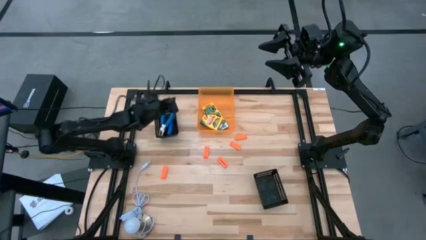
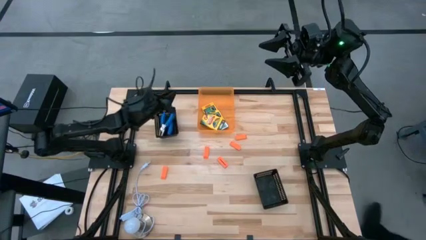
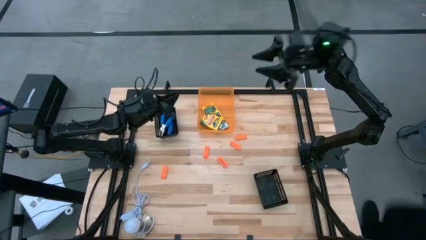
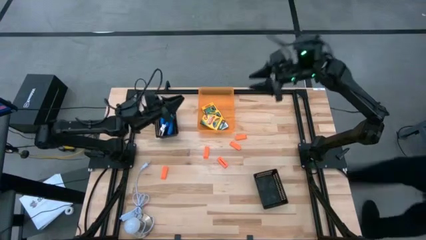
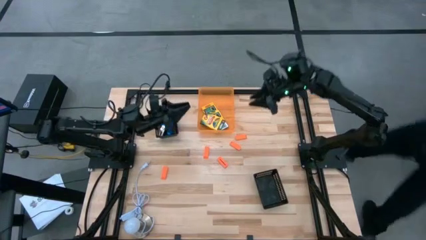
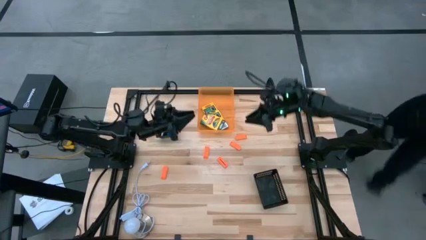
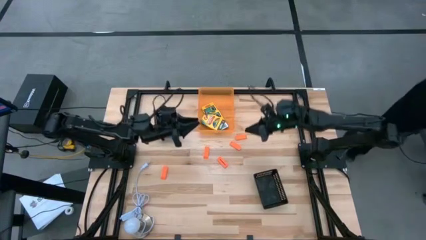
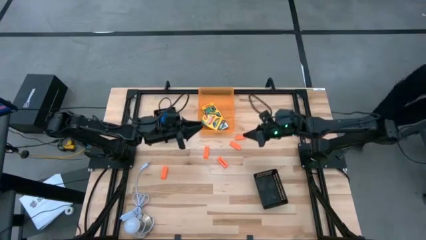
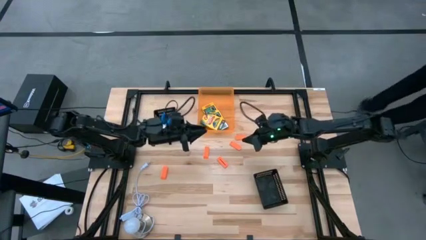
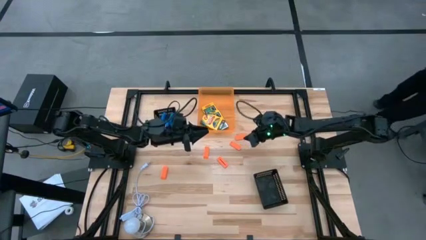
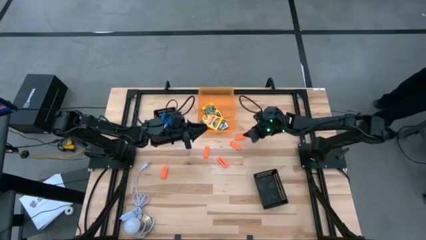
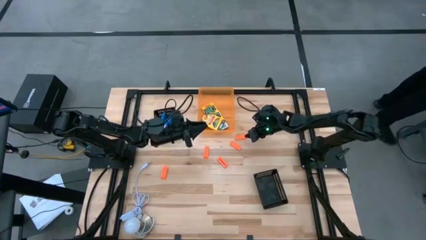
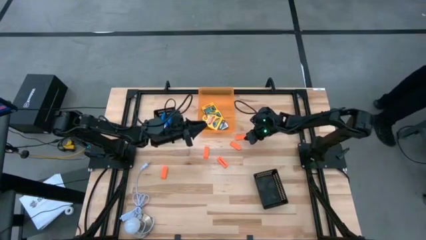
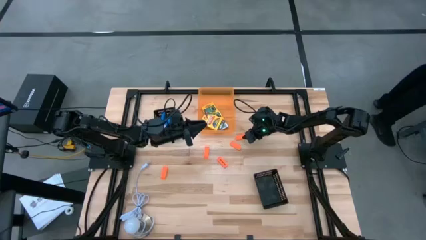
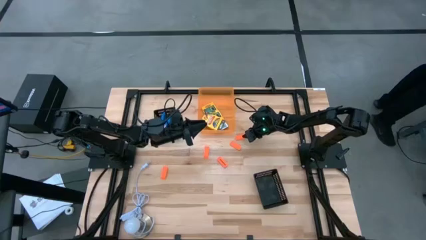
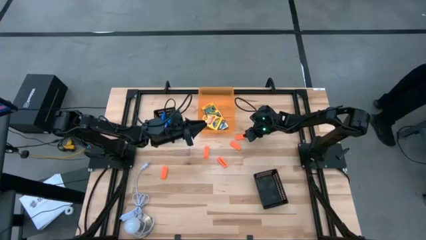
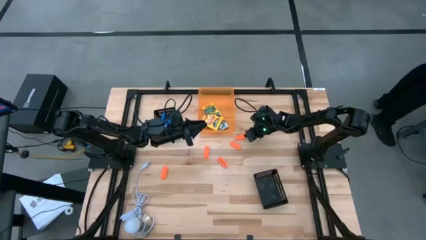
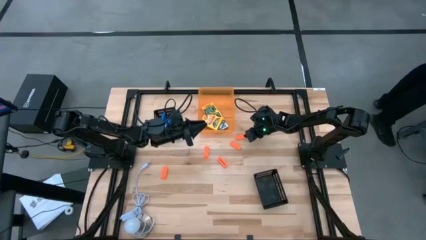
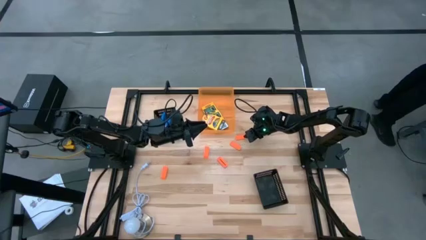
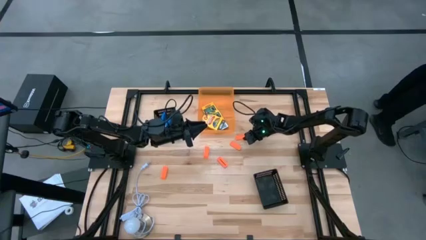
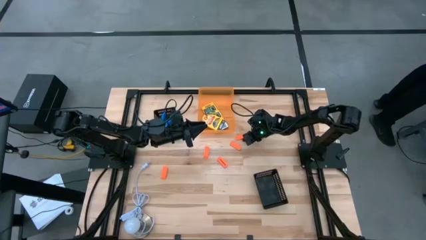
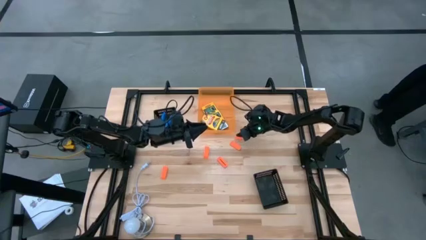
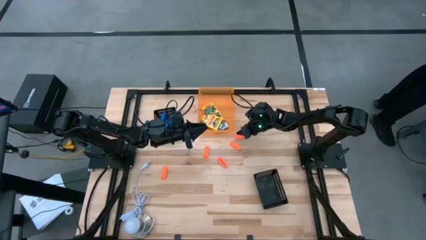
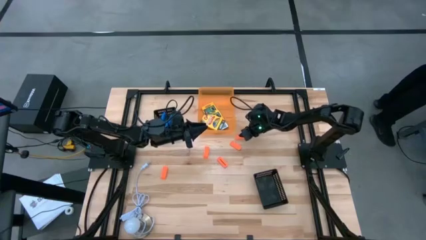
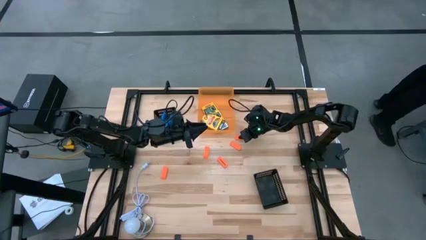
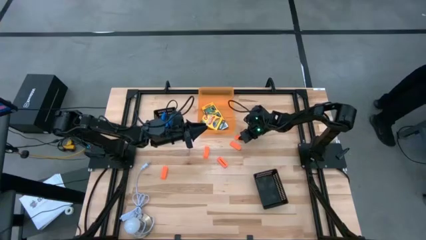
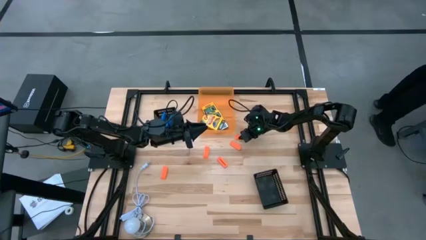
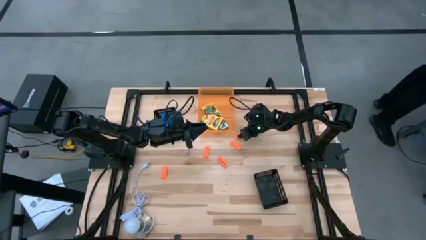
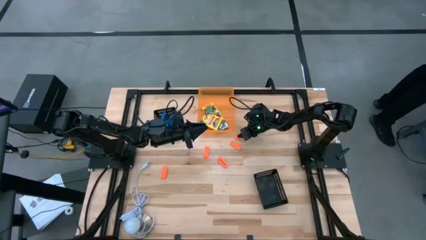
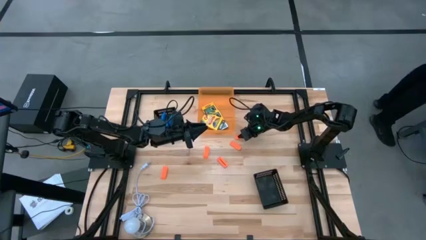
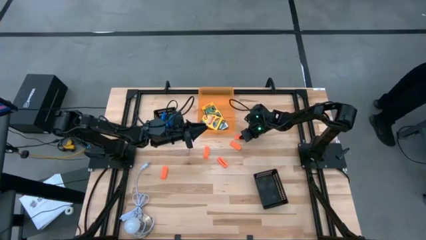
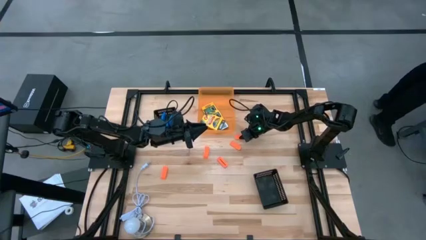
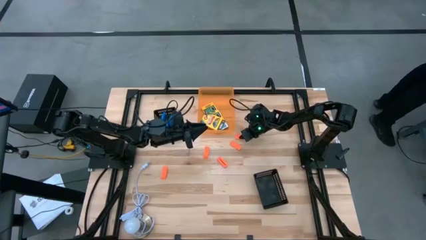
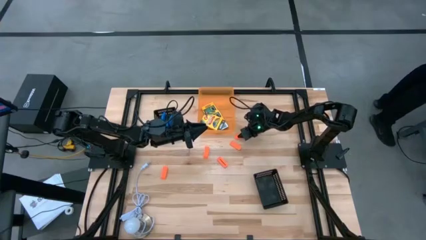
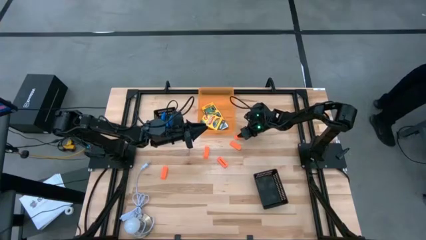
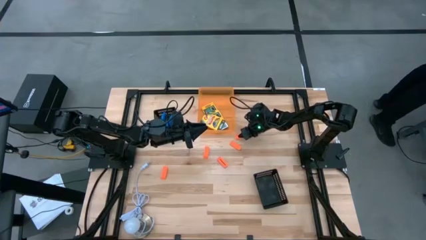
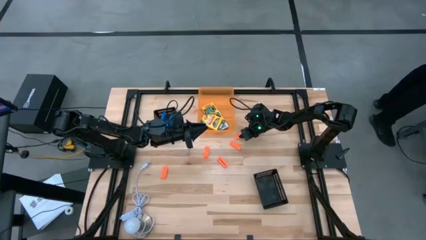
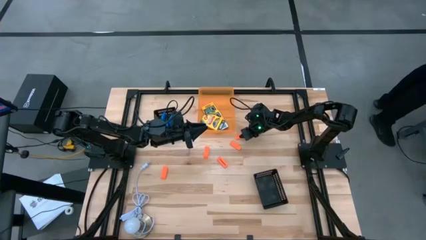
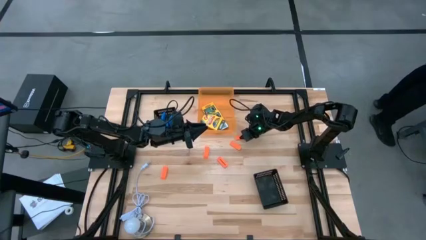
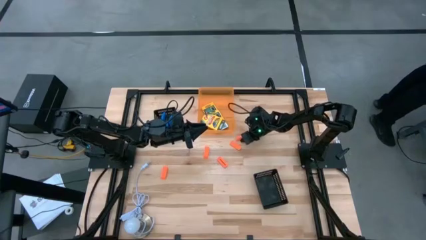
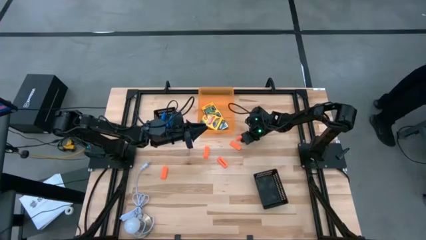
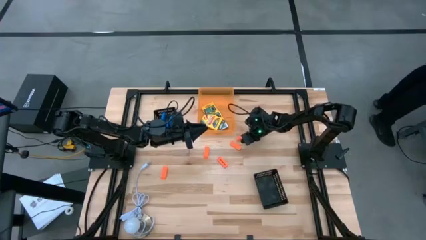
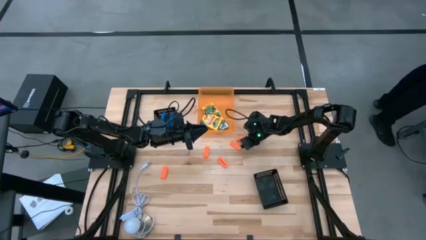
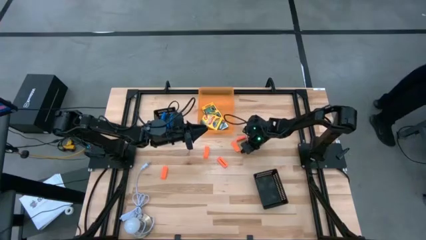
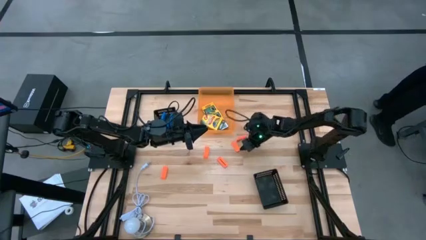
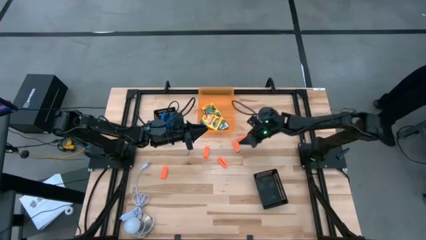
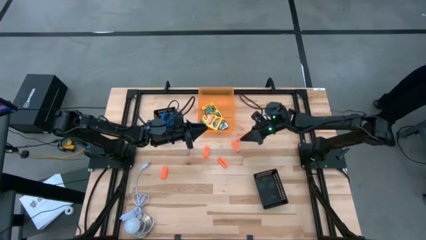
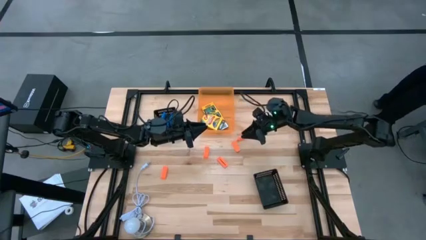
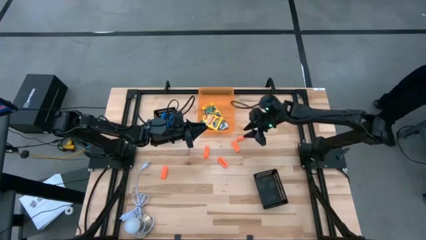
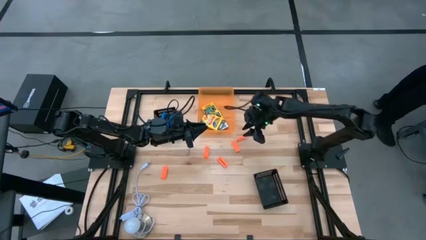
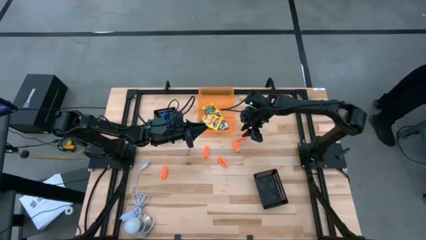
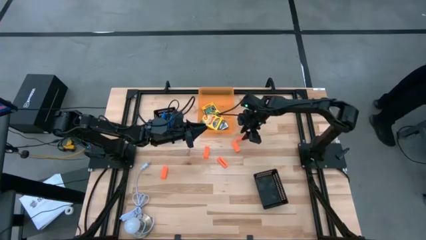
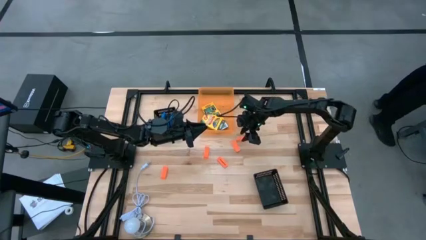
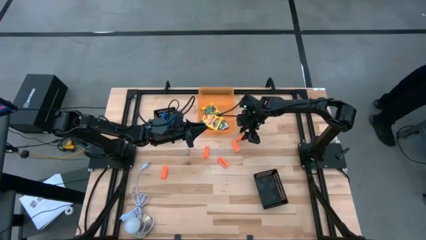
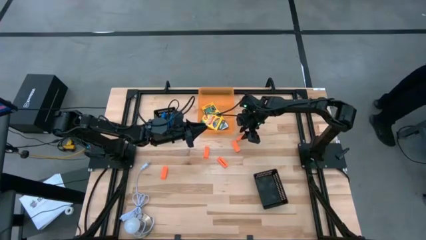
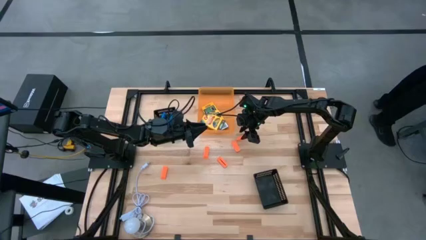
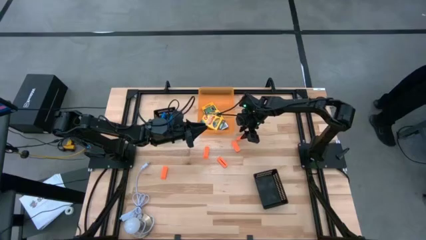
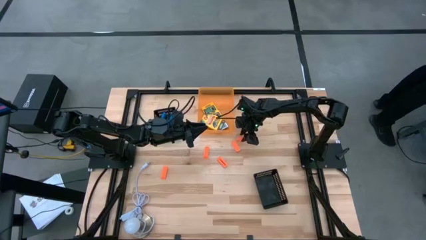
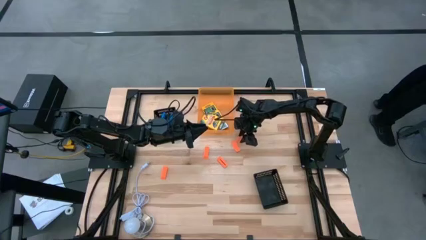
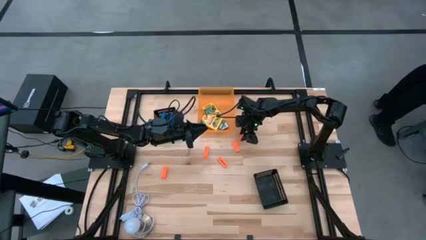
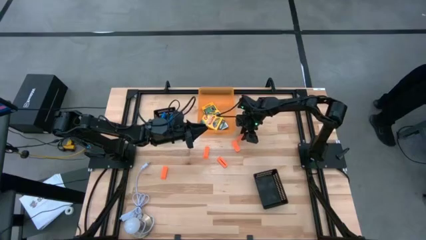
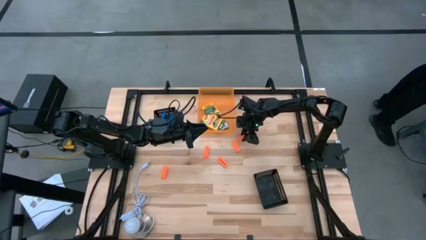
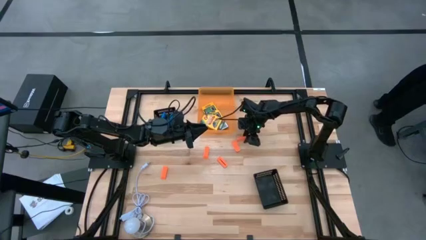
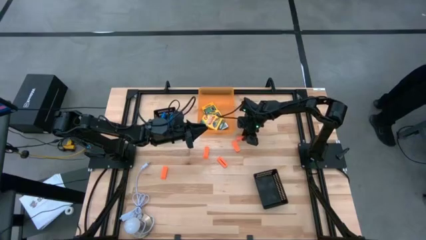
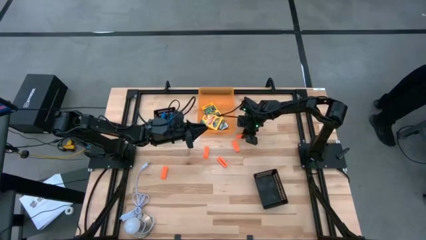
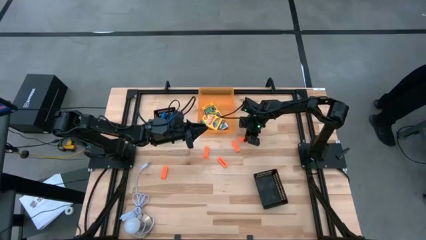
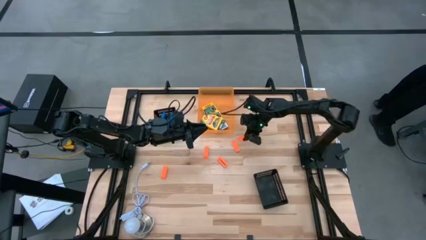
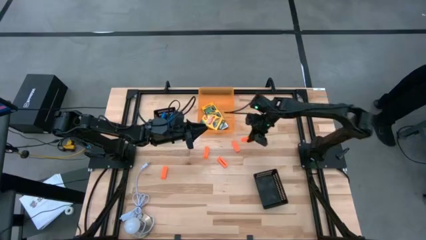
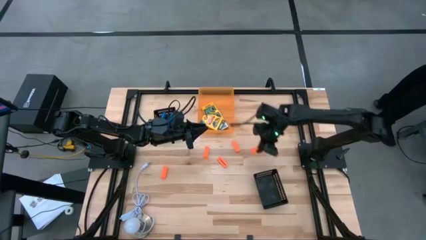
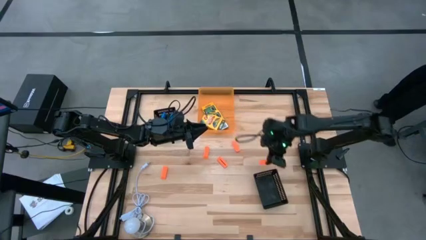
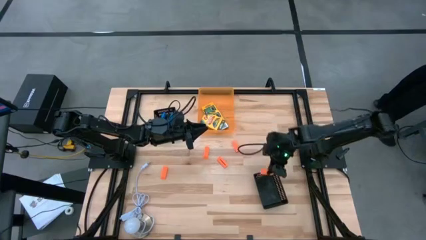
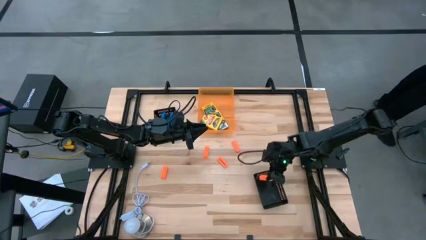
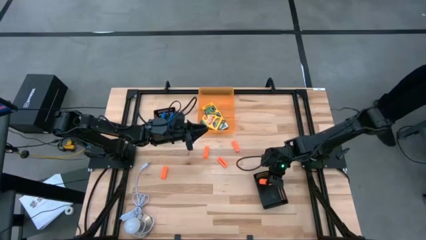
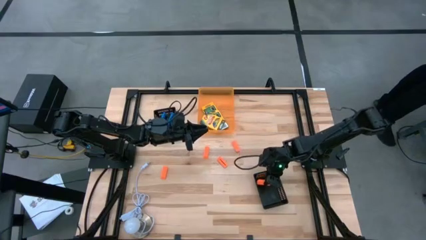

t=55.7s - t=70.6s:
Task: Pick & Place School Supplies
Put the orange eraser into the bottom black bin

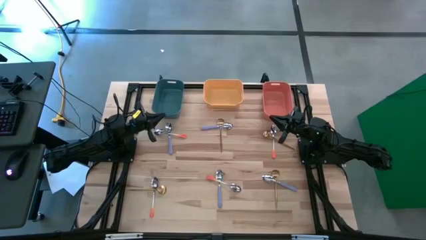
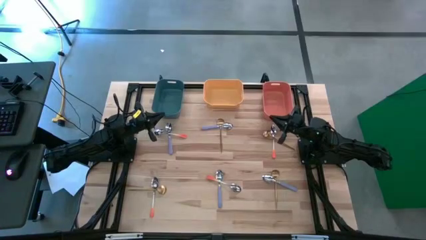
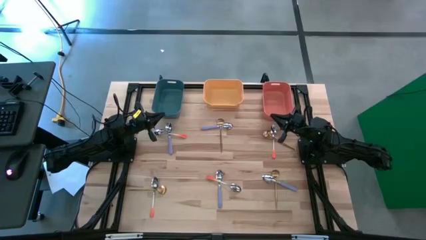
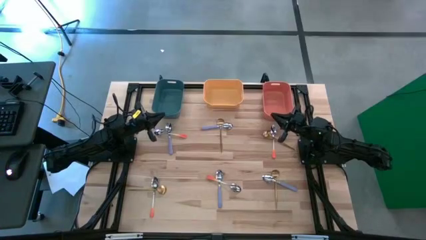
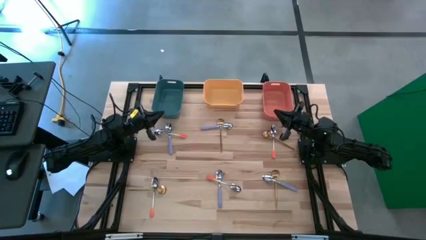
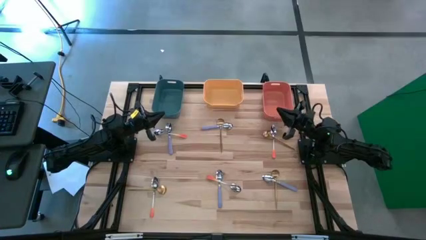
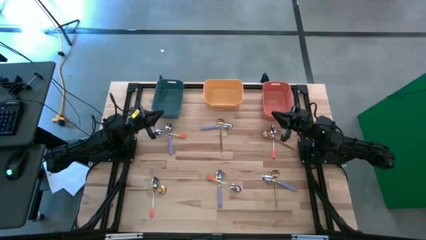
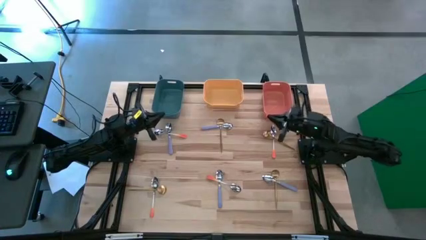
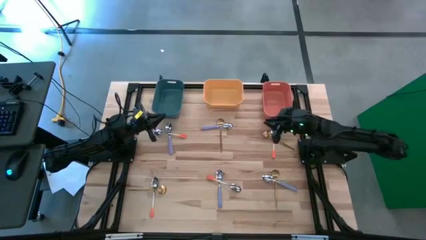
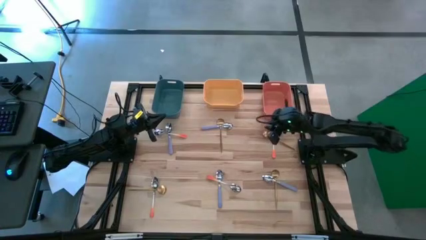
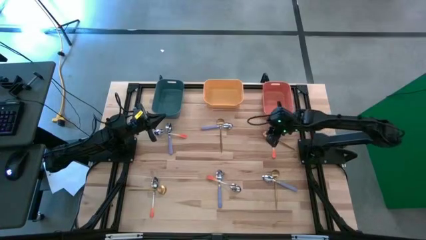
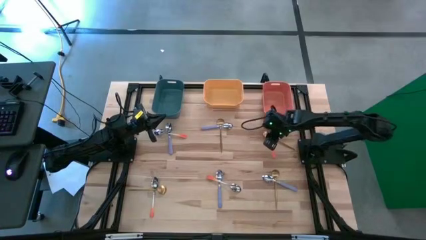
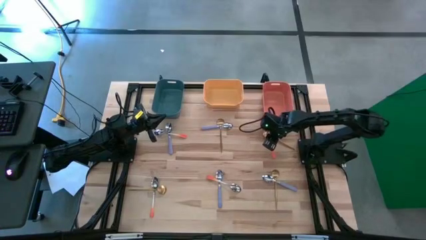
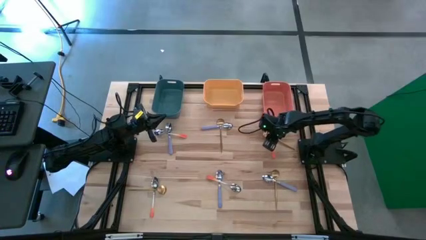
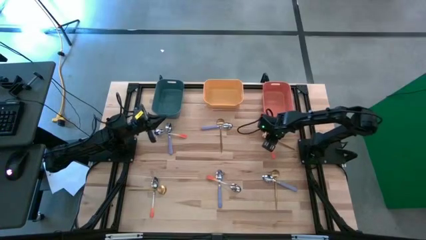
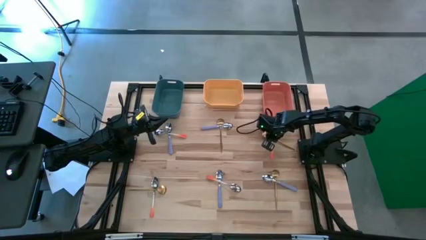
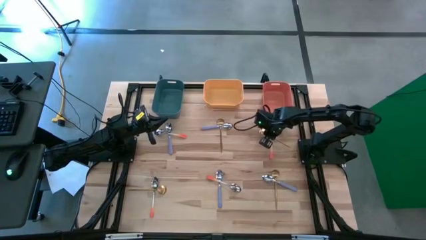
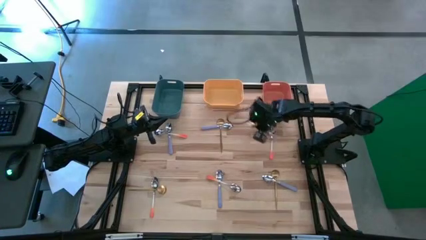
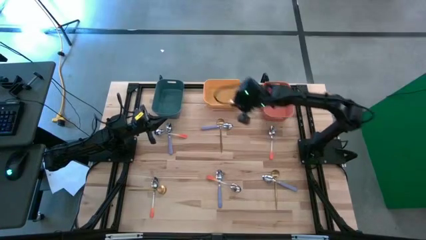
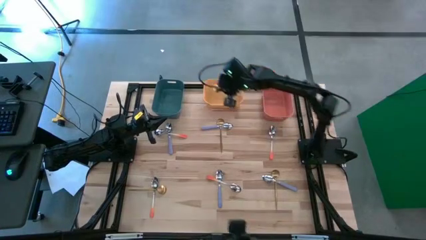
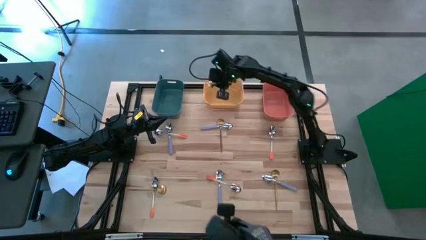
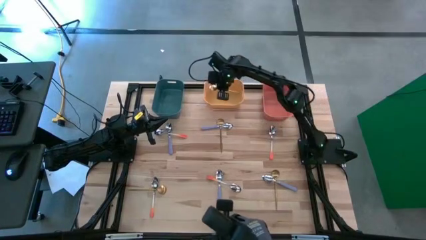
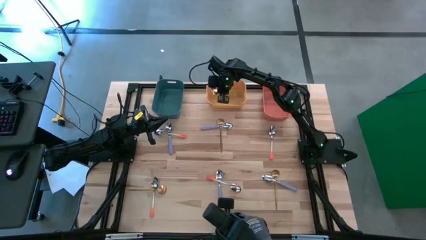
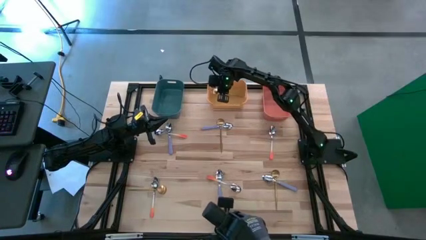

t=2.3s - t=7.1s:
Task: Sort silverware by color (type)
Put the top right gold spoon into the yellow bin
